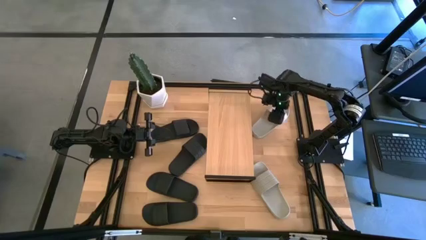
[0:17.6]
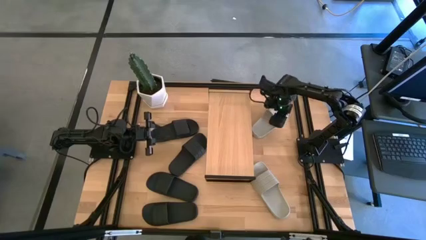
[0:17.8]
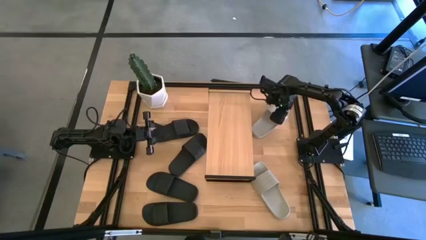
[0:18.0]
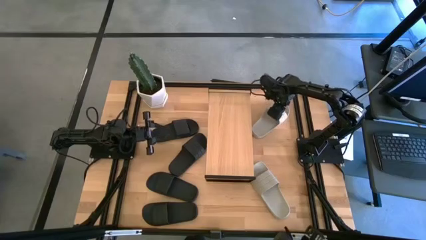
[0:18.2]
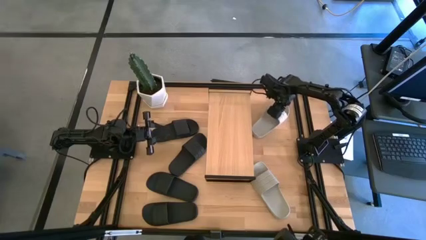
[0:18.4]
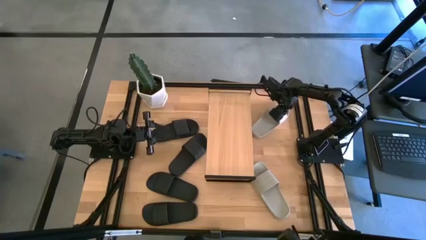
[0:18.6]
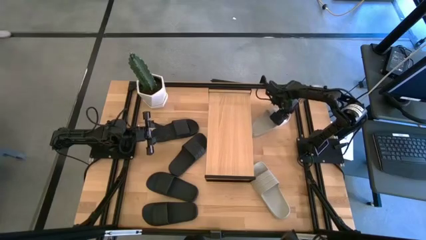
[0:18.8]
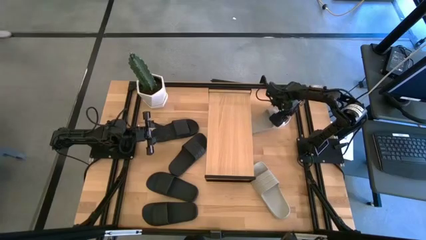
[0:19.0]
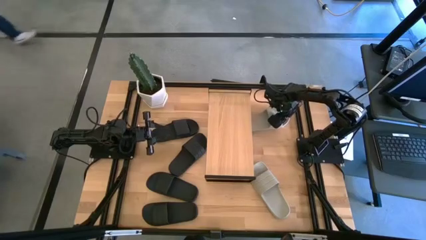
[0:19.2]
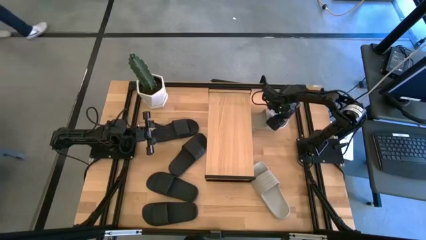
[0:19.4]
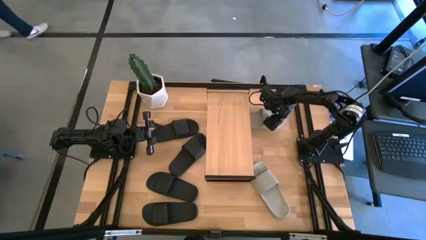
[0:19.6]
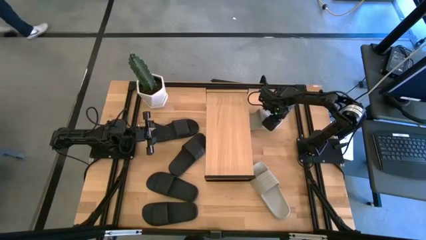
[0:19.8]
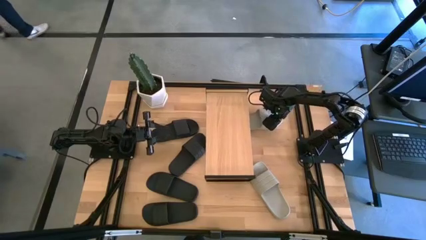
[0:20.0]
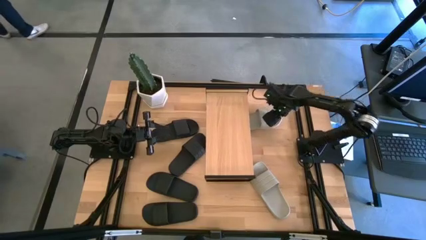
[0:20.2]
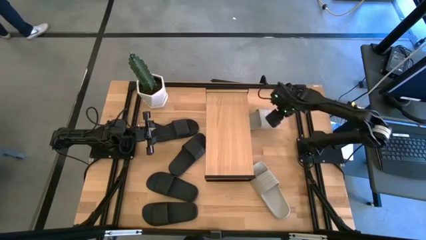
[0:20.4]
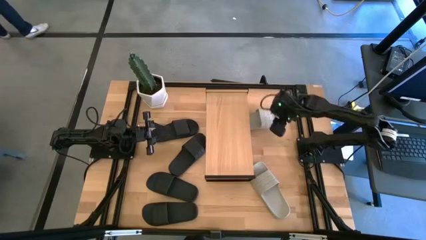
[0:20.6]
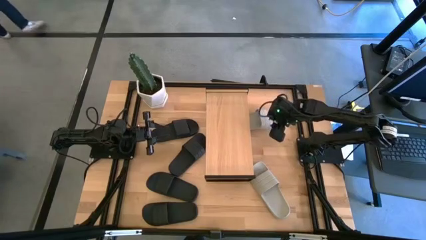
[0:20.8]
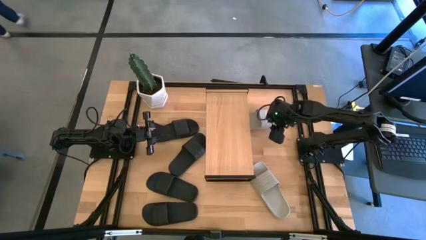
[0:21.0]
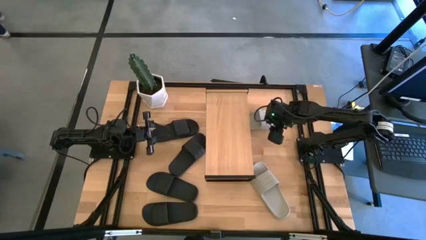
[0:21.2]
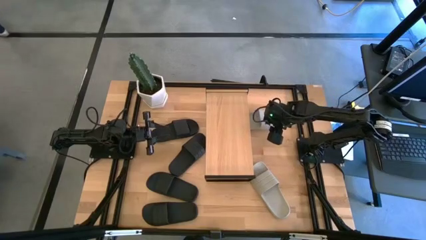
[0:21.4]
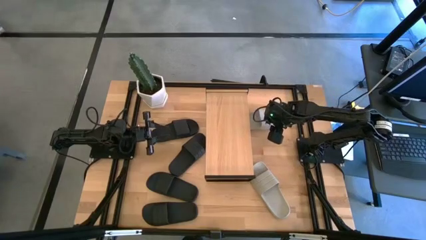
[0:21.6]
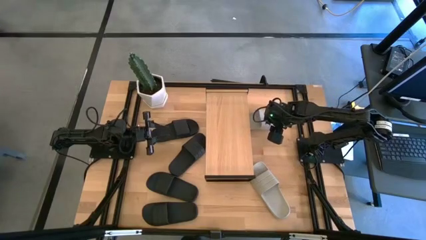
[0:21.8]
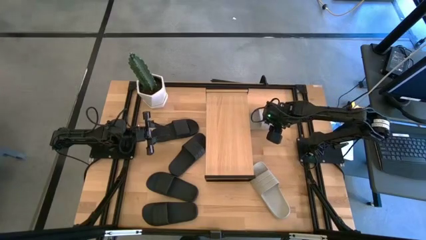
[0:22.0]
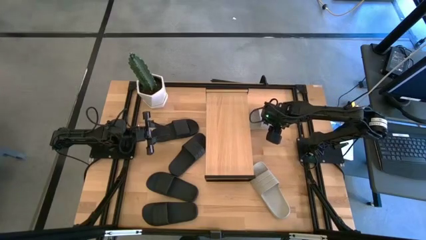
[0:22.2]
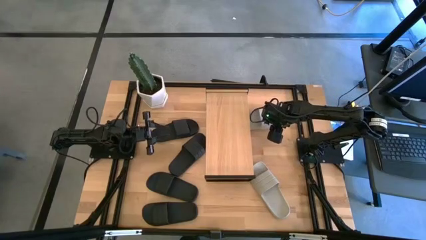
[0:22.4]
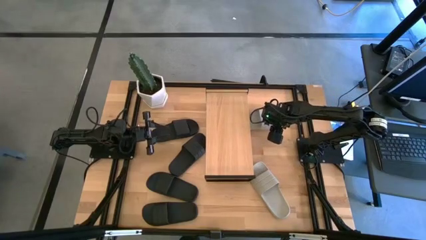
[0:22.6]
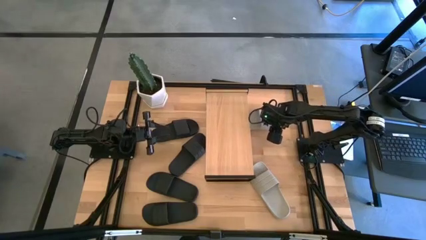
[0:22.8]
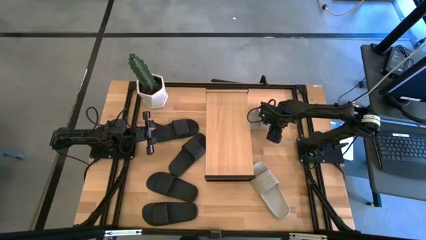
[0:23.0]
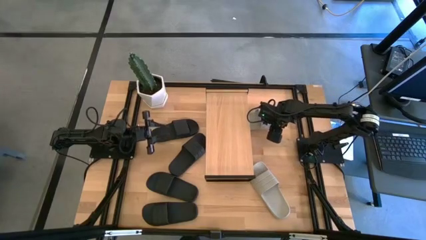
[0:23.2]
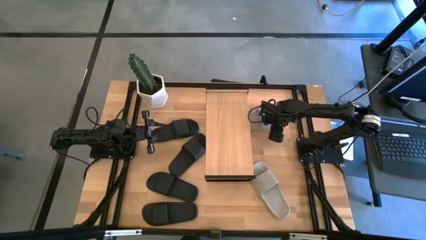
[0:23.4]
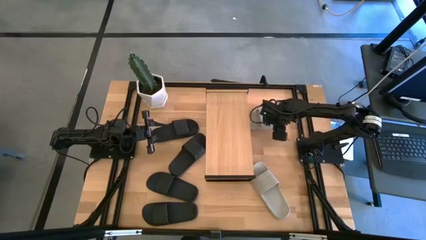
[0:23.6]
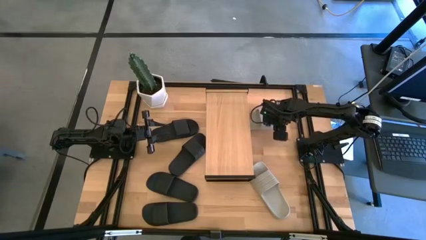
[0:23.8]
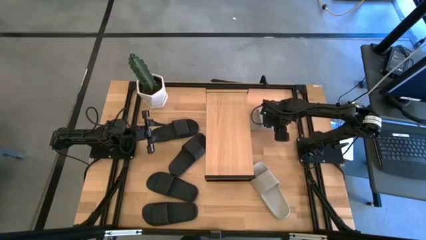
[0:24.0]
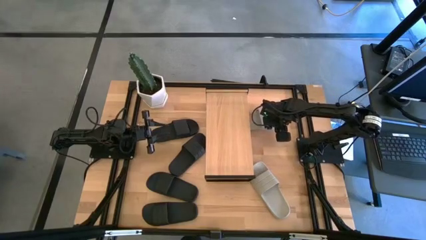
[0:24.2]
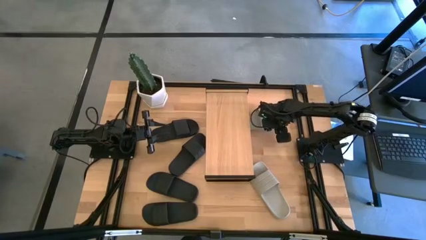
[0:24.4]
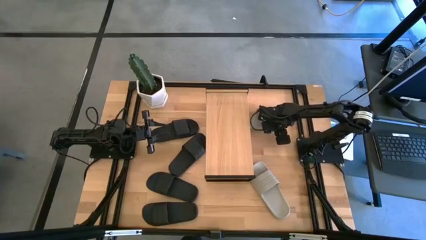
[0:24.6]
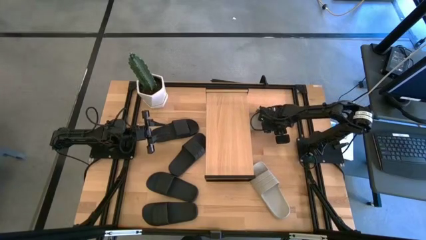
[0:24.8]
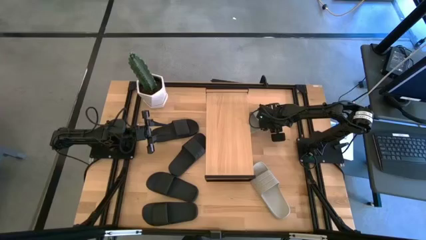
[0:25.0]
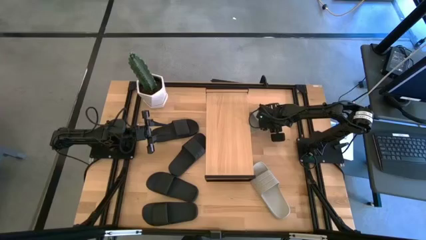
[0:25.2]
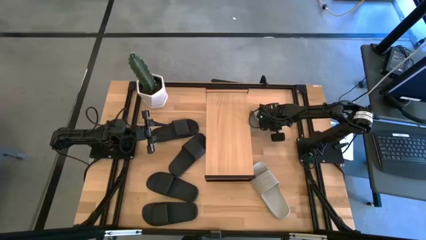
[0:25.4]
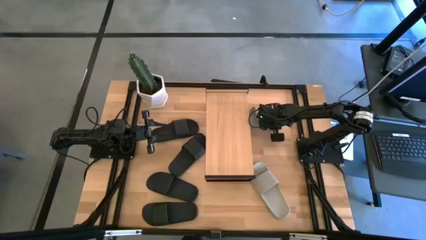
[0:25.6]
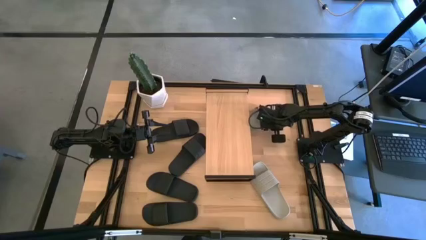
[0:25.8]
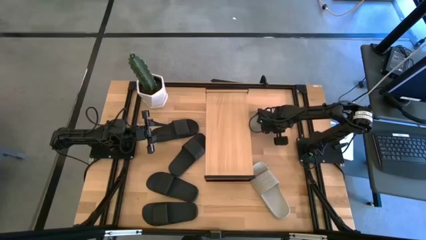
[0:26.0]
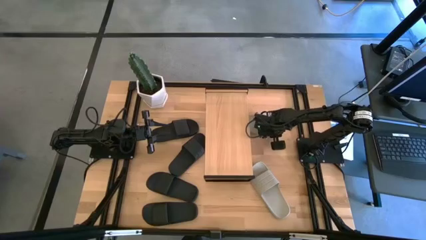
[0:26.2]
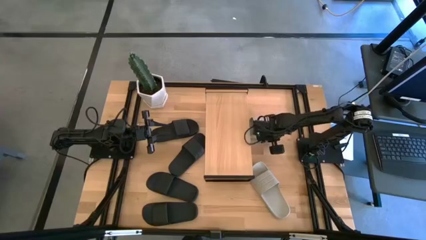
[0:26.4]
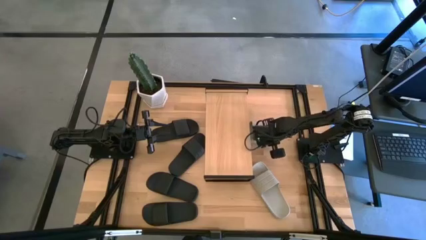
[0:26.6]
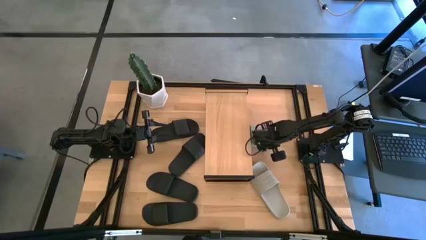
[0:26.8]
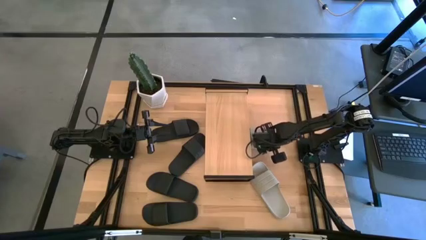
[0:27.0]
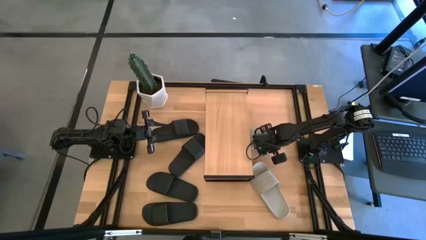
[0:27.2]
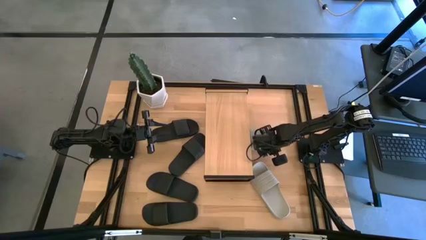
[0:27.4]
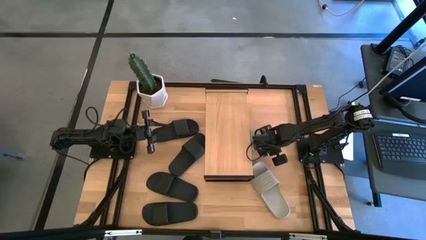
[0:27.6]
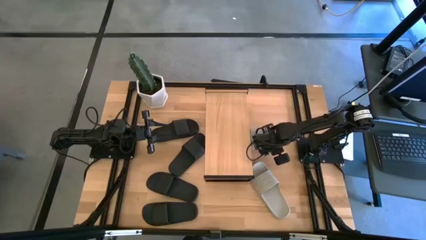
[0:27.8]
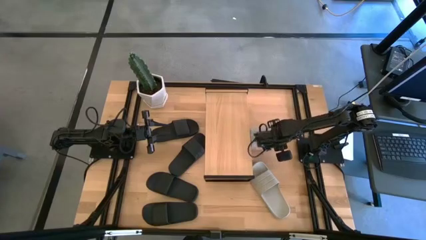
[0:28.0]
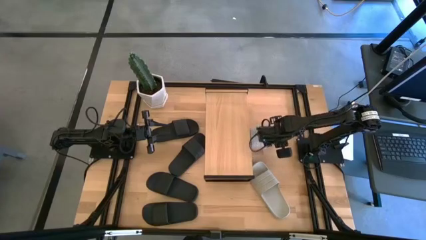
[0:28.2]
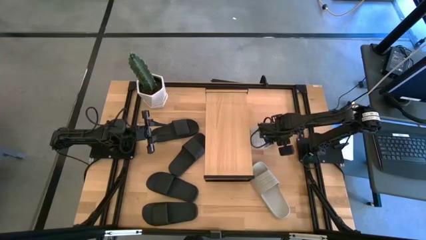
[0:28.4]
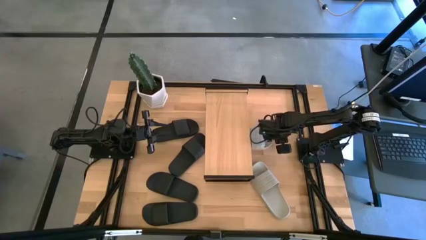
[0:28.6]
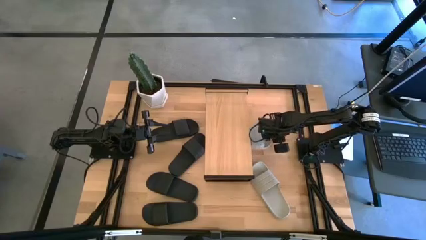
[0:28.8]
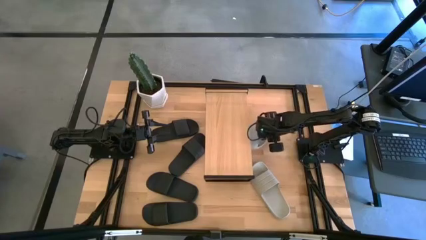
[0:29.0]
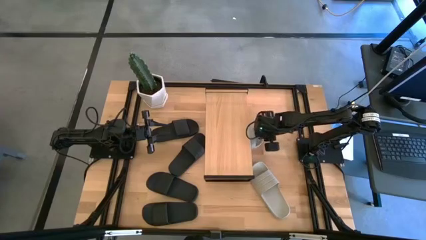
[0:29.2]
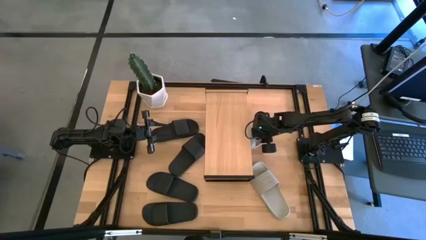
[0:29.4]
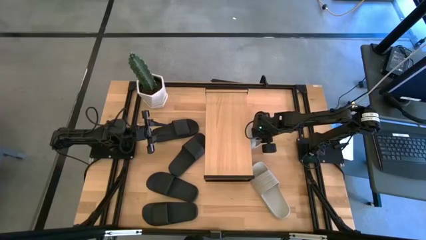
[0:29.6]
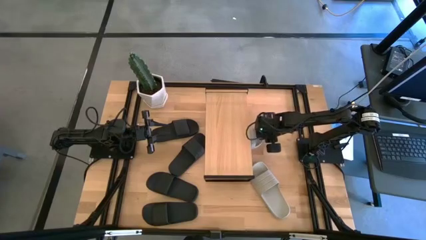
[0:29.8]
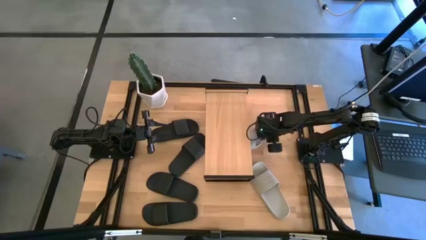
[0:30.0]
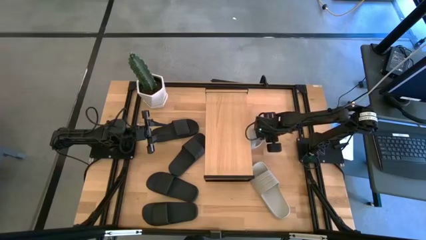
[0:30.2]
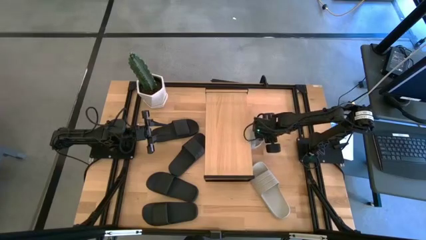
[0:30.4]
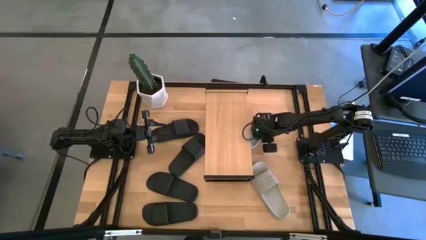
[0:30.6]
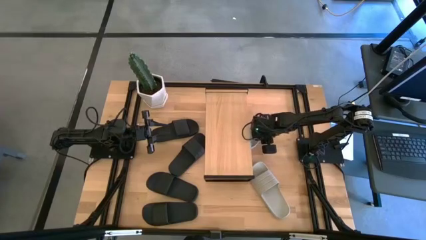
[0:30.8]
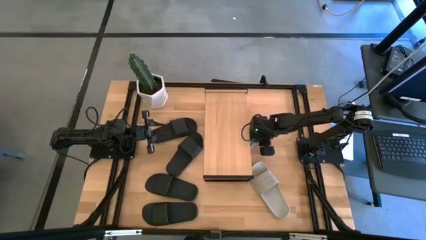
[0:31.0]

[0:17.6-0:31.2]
Task: Pick and place slides into the shelf
Put the gray slipper under the shelf

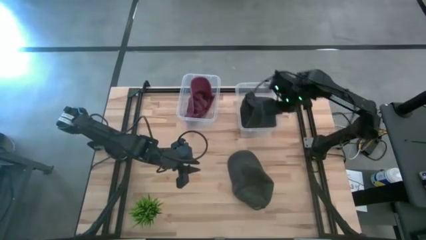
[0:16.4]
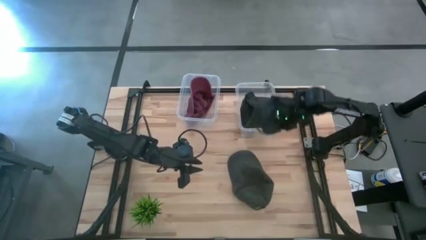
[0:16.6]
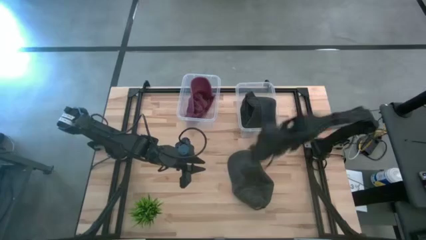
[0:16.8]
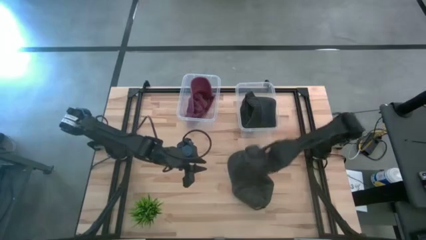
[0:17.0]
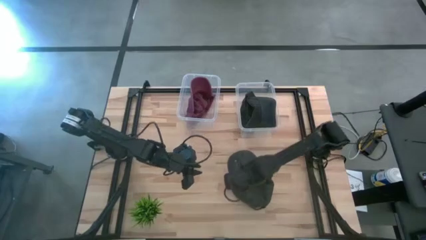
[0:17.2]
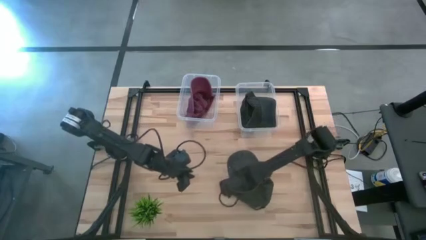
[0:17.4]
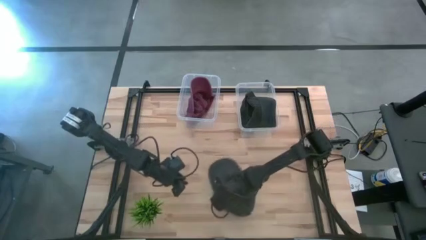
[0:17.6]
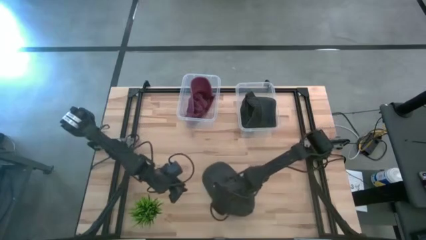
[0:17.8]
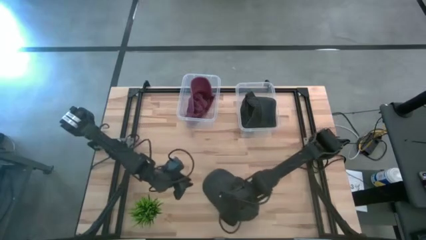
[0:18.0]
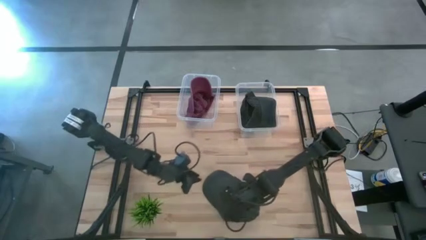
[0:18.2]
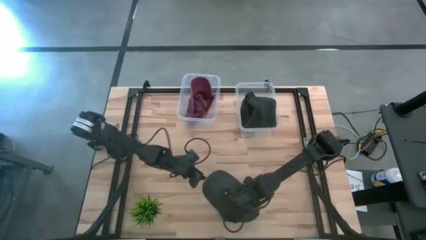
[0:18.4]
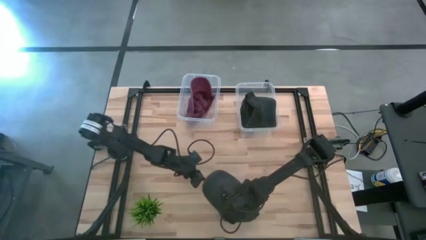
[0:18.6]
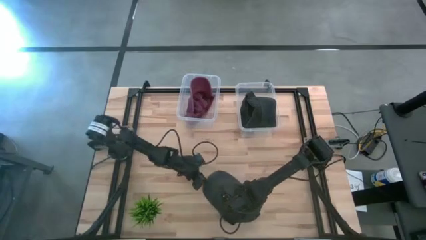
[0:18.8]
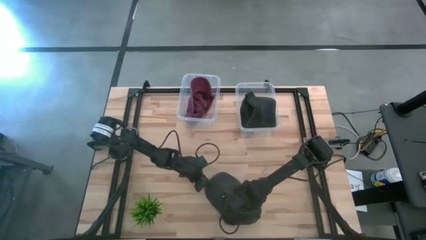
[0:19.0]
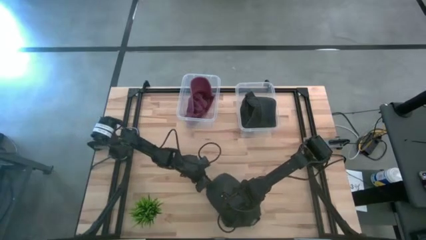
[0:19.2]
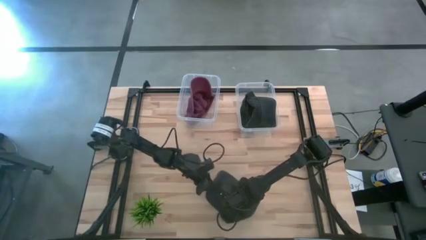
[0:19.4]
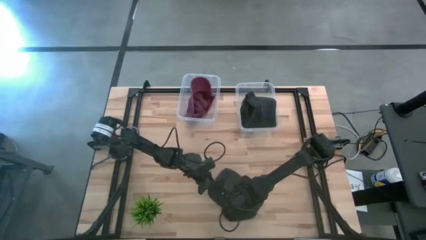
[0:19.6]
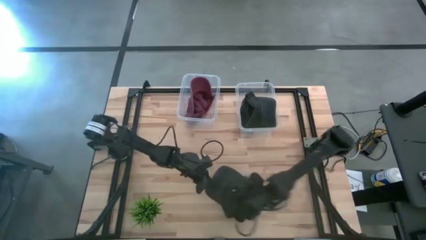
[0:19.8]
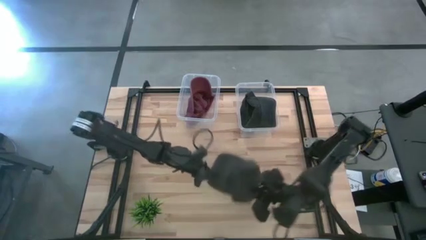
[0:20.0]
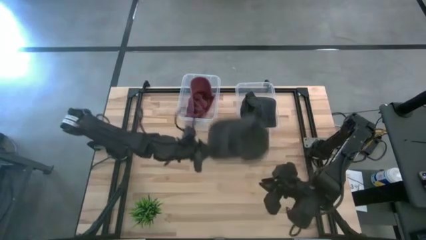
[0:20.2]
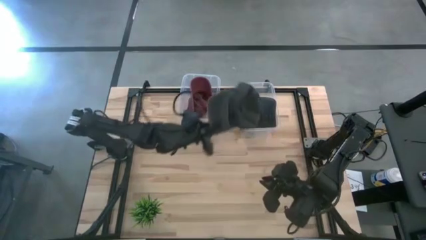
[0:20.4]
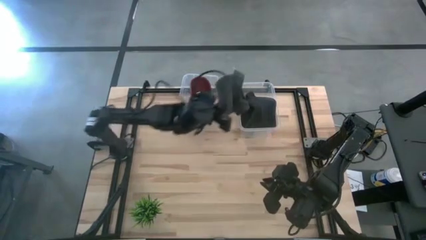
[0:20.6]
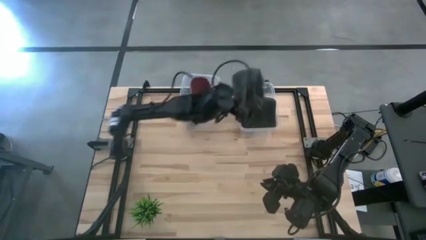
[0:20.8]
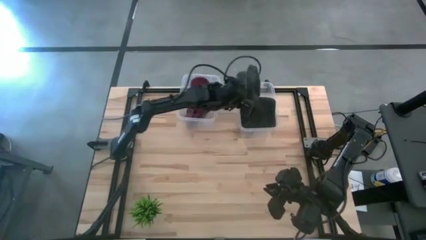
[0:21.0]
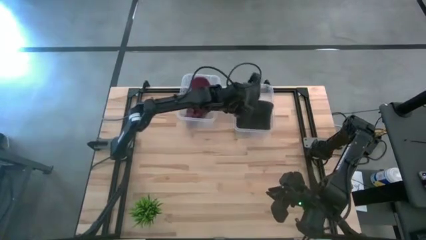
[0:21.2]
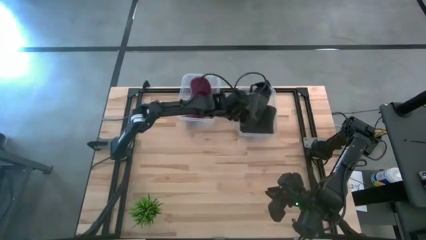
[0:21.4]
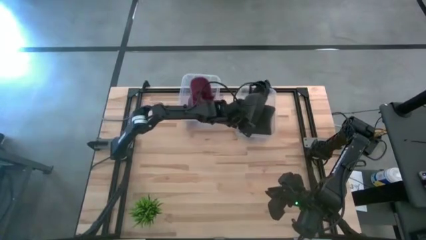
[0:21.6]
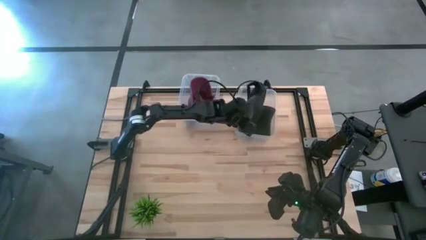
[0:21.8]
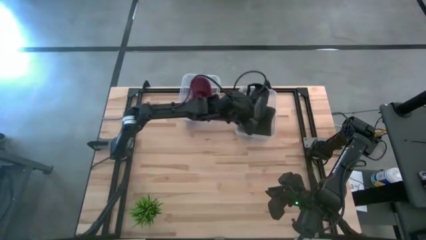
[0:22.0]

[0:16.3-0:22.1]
Task: Pick & Place hat
Put the black cap into the right transparent bin
